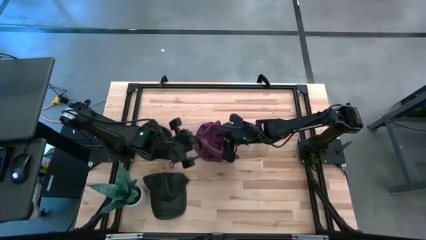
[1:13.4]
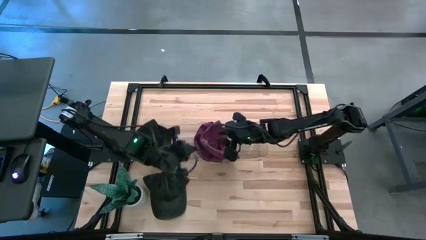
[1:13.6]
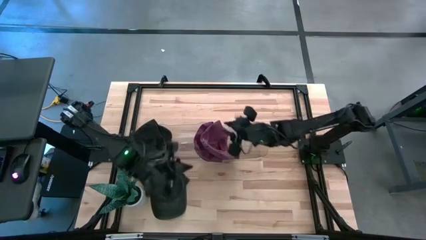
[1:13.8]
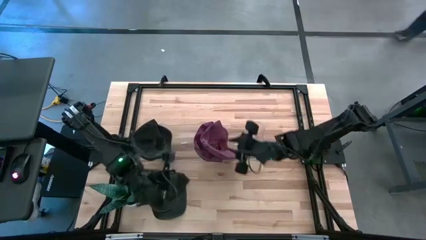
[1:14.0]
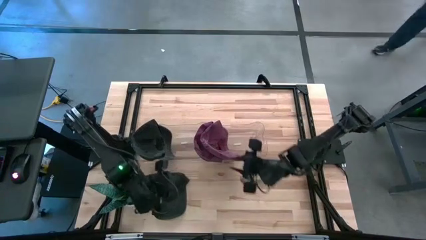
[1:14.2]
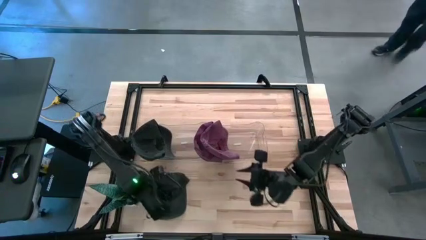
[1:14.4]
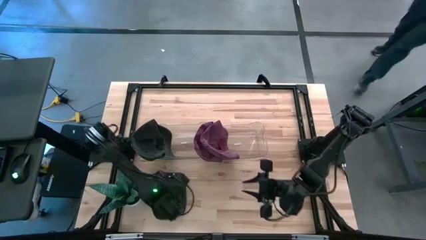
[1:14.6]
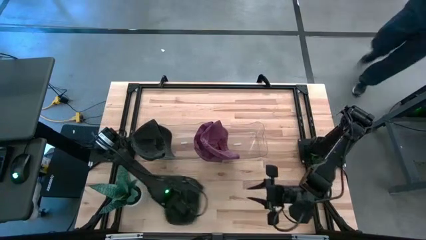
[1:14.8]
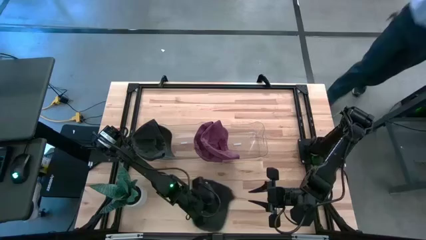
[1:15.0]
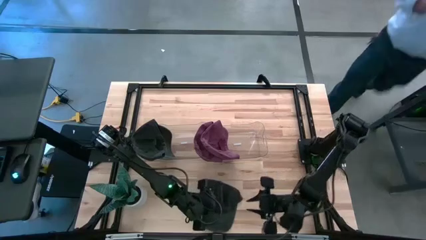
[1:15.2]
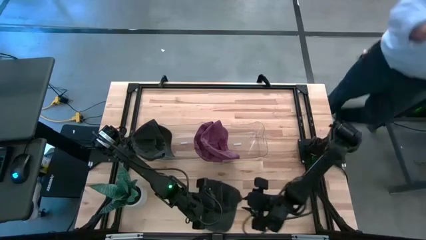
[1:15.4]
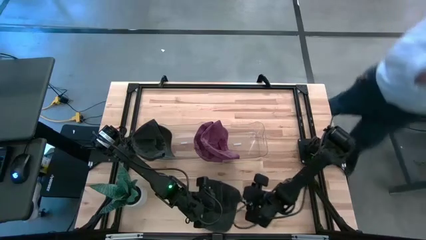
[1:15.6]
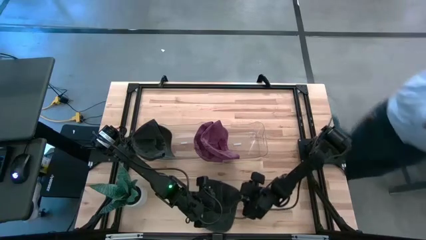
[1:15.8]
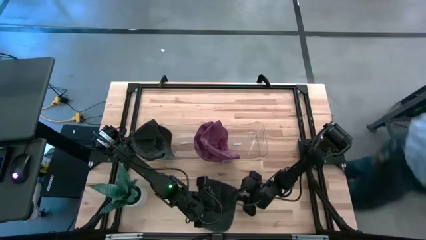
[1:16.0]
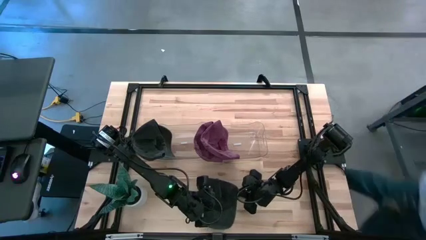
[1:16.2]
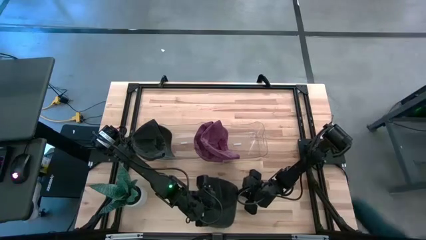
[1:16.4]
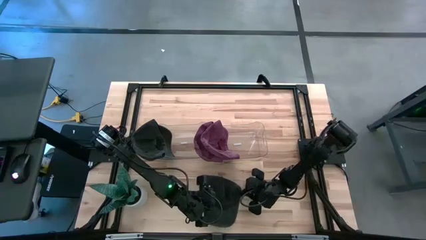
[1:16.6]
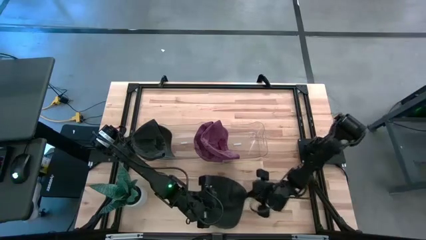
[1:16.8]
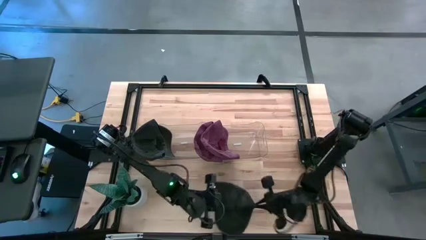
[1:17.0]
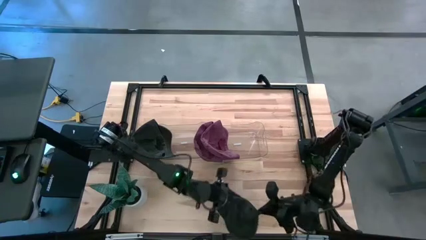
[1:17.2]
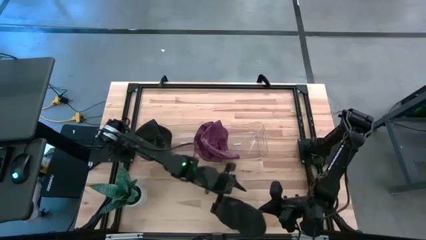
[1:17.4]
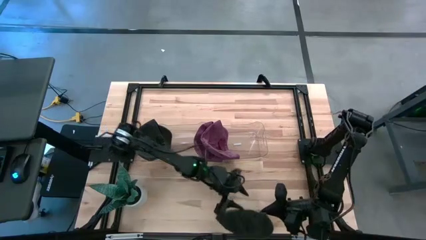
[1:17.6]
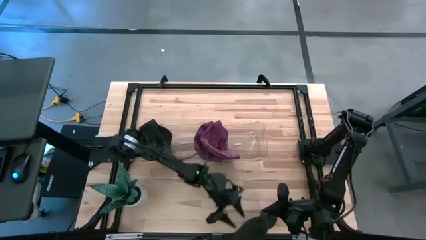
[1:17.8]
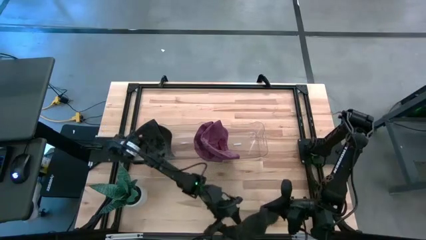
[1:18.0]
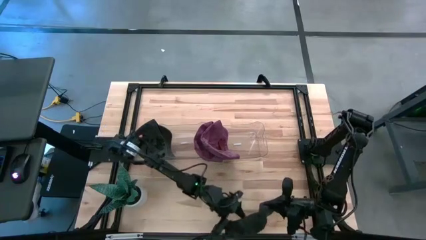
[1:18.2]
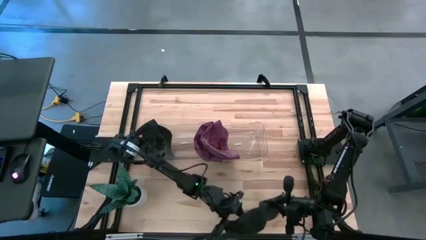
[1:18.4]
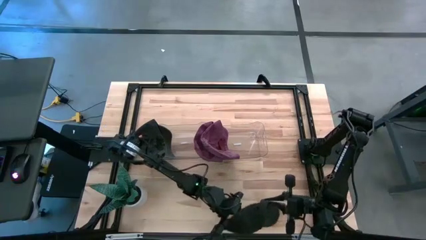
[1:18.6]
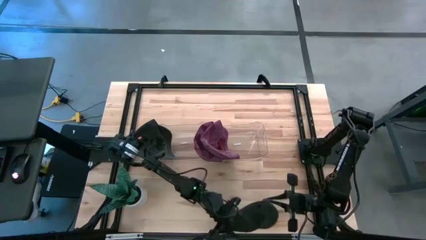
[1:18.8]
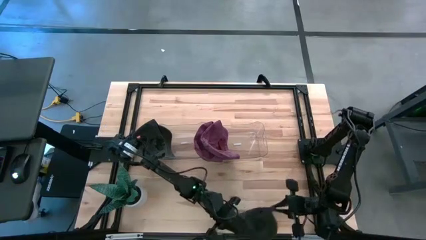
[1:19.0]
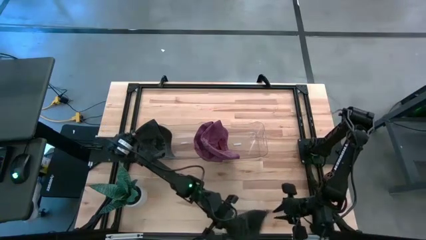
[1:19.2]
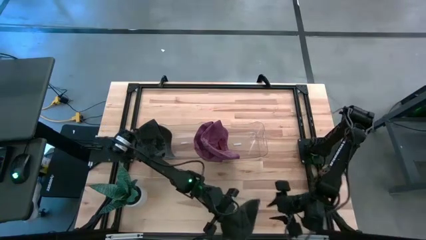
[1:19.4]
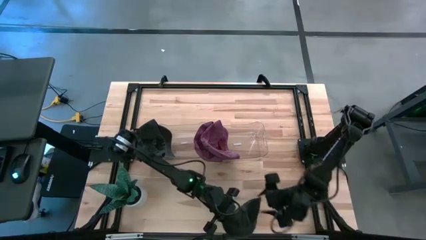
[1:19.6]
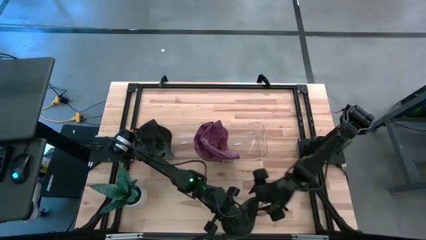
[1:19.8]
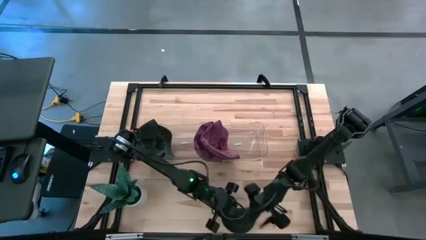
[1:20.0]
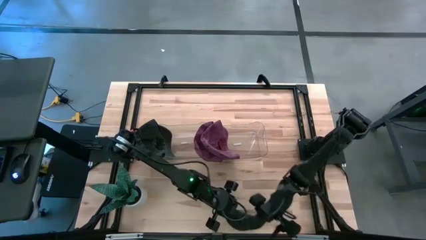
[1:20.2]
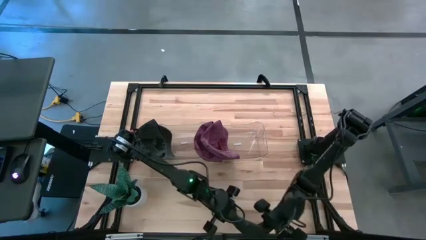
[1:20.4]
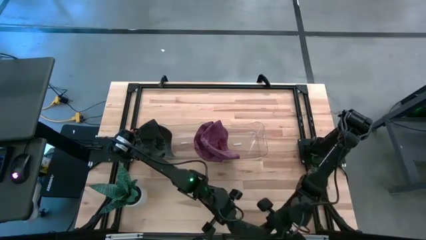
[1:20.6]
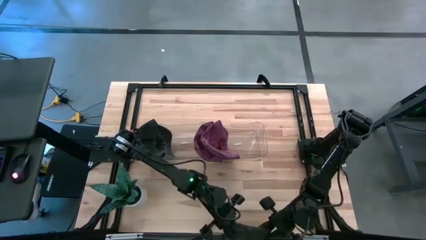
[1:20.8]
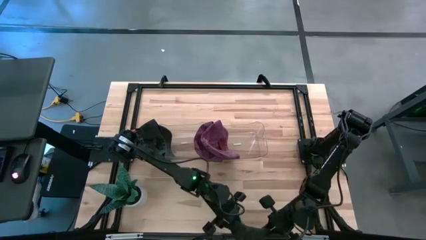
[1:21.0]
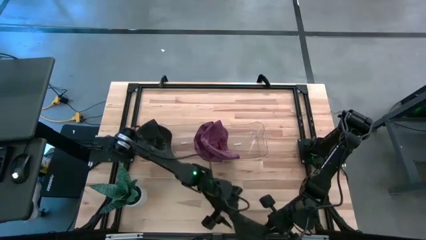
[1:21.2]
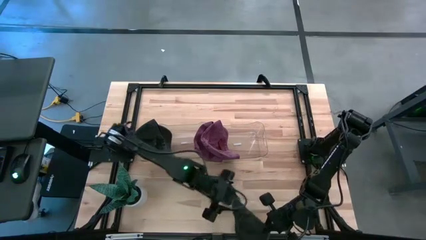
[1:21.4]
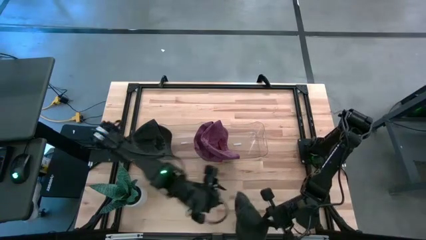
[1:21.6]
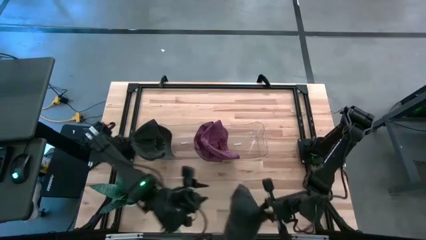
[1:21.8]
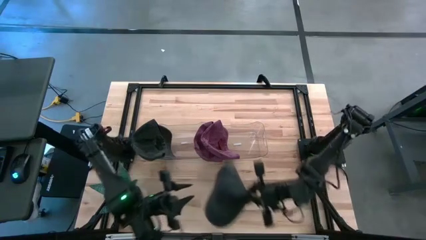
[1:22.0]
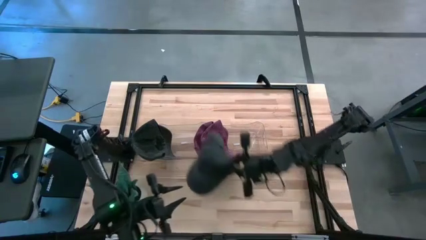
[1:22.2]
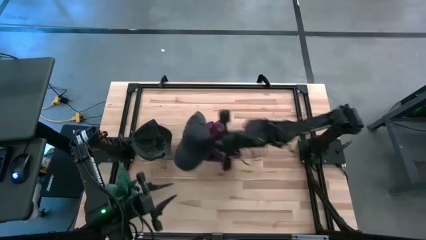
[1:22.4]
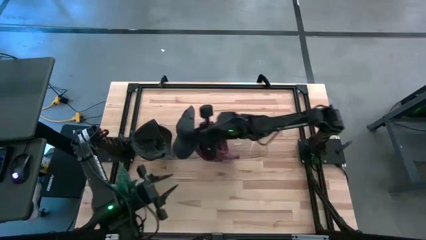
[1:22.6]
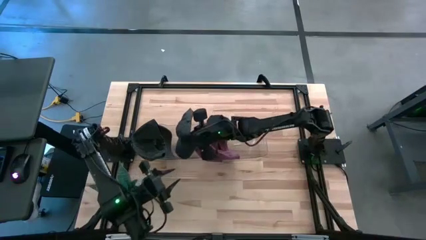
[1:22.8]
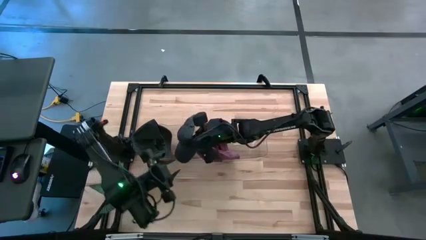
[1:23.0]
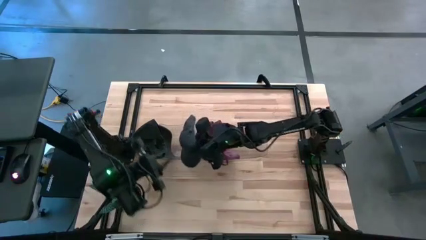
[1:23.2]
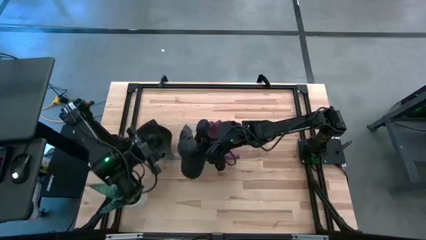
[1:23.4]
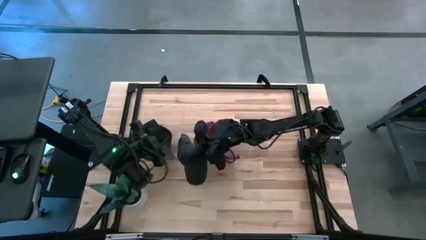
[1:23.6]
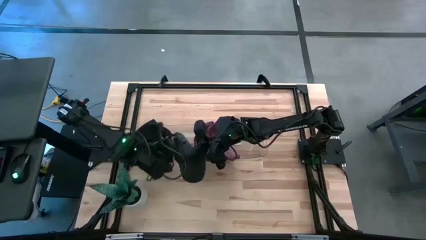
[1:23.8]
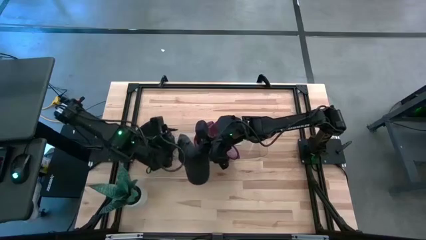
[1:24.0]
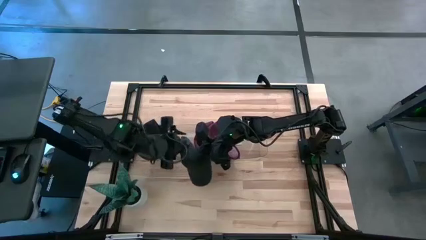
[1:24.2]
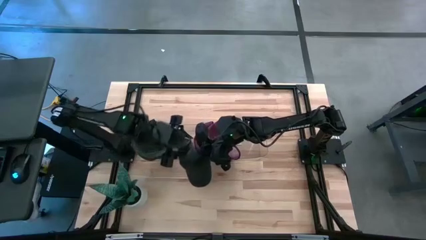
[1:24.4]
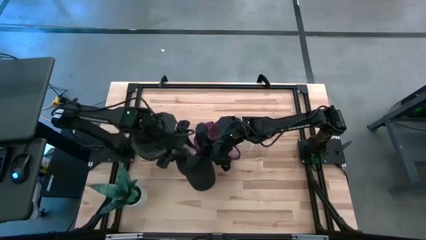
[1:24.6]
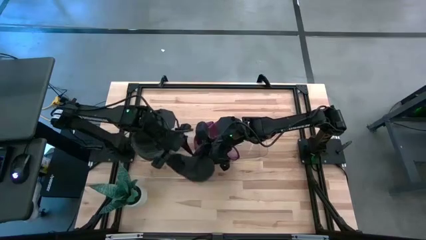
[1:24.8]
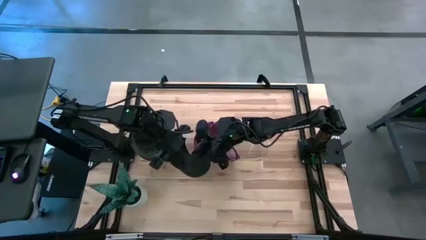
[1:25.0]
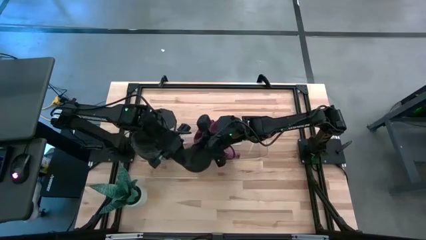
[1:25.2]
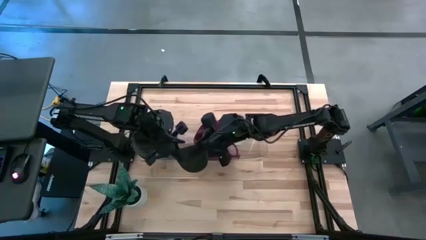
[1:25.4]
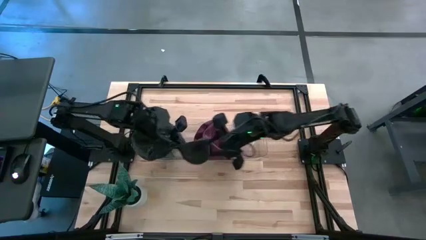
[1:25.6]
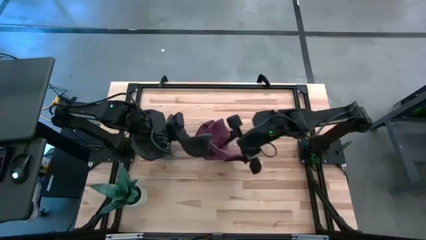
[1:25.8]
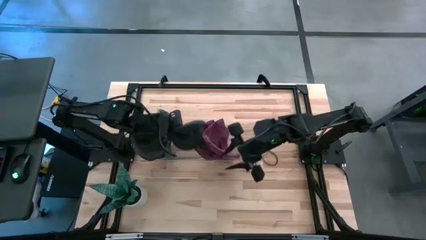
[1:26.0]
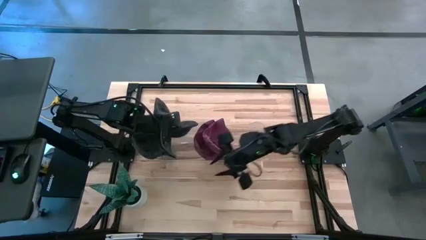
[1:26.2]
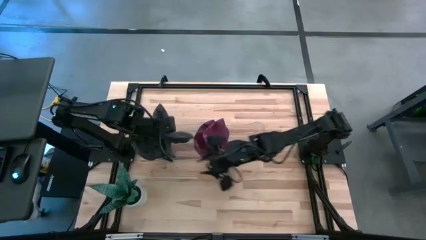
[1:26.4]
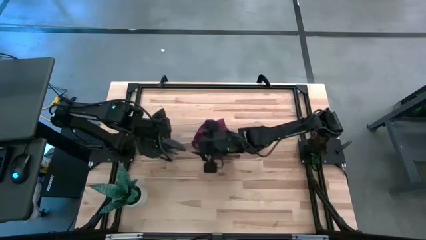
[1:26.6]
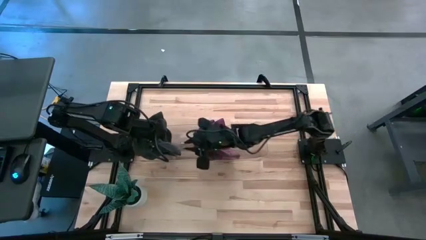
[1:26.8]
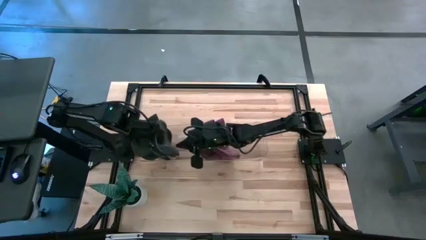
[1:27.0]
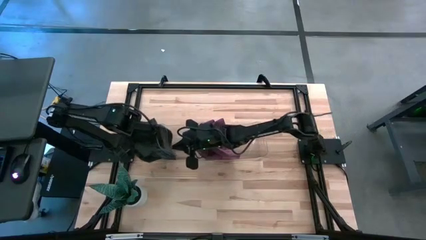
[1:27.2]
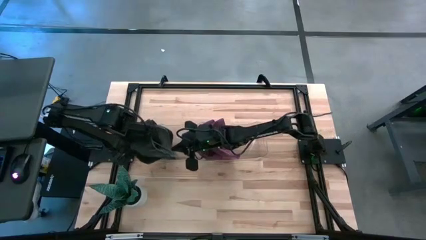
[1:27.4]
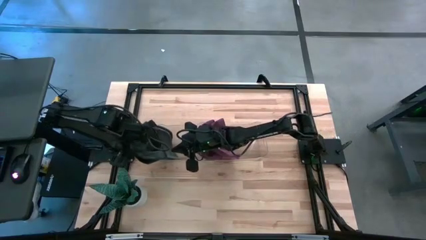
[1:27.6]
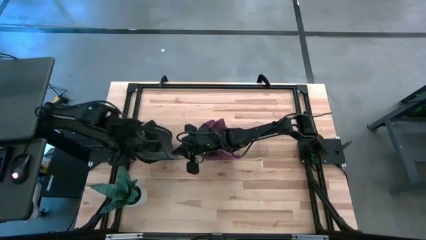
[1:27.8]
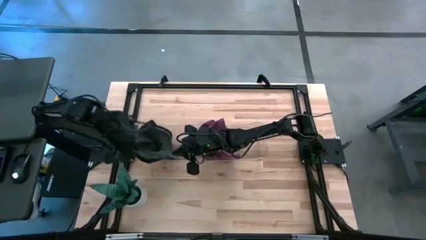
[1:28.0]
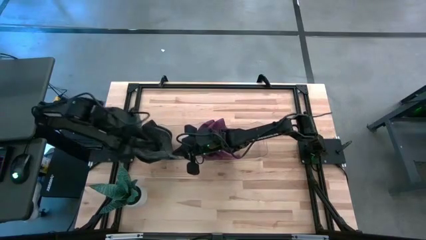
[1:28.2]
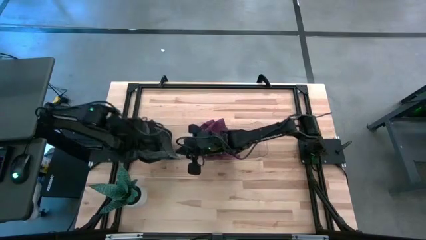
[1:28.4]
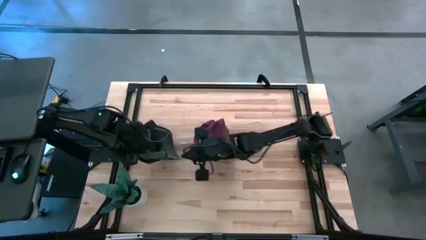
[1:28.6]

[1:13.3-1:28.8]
Task: Pick & Place hat
Put the black cap into the left transparent bin
